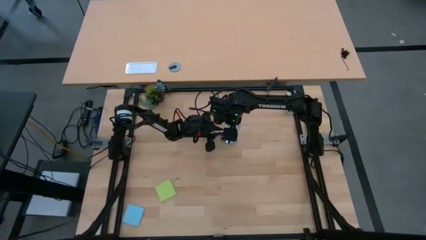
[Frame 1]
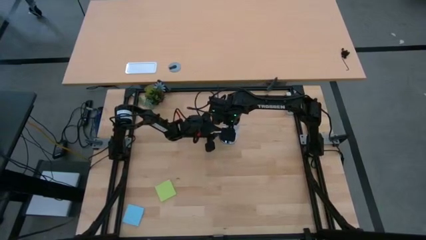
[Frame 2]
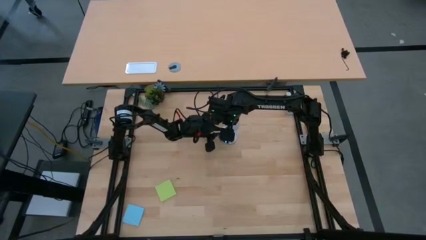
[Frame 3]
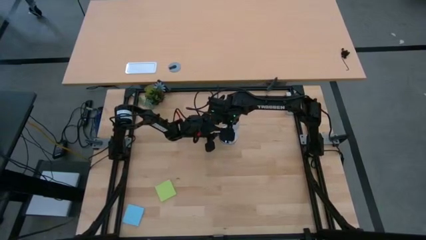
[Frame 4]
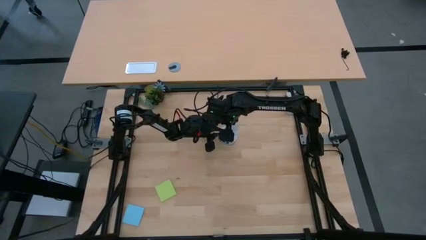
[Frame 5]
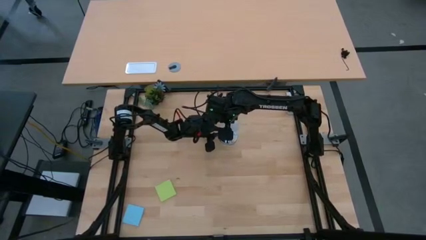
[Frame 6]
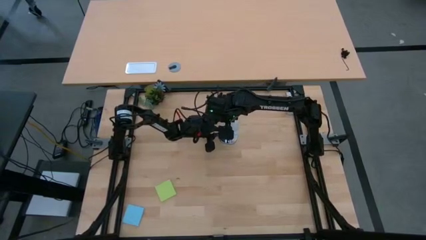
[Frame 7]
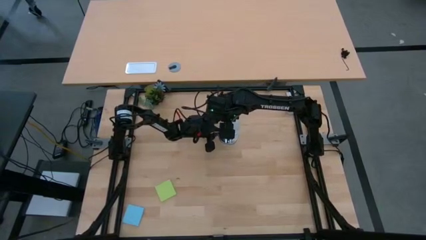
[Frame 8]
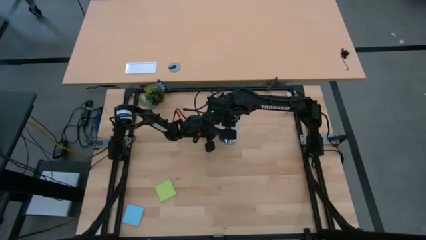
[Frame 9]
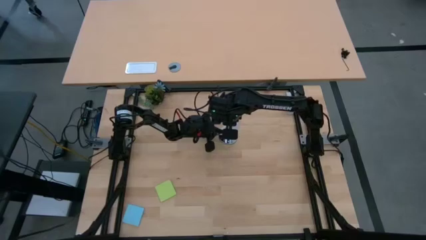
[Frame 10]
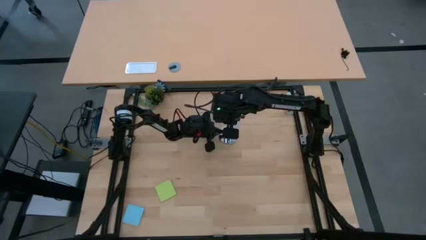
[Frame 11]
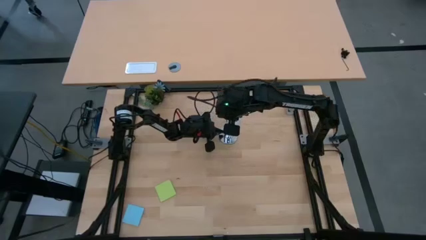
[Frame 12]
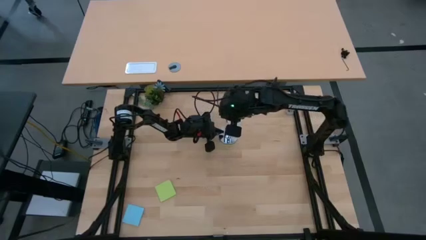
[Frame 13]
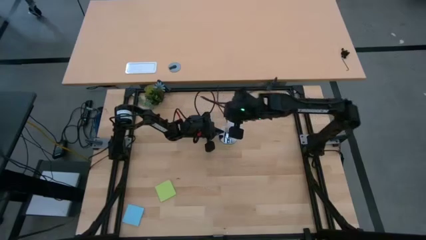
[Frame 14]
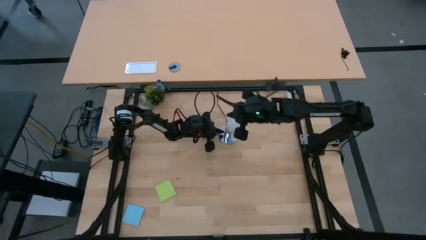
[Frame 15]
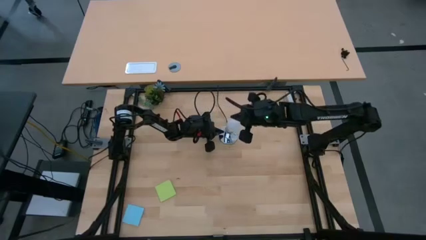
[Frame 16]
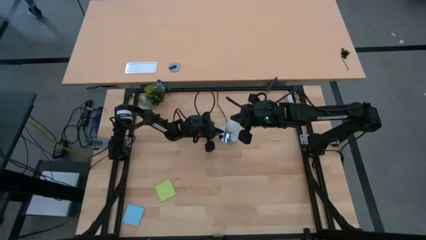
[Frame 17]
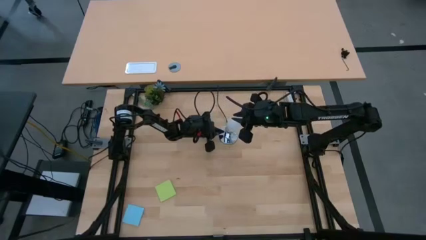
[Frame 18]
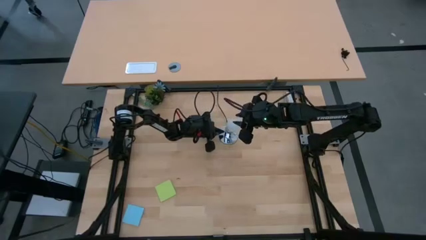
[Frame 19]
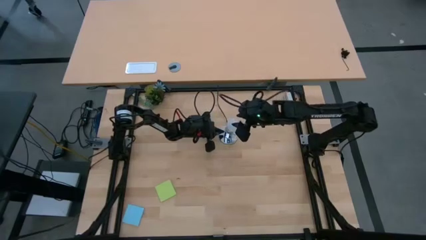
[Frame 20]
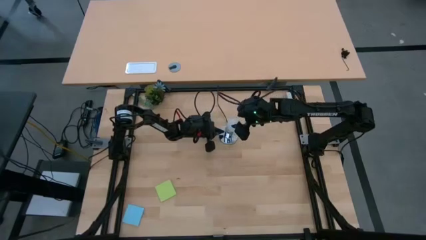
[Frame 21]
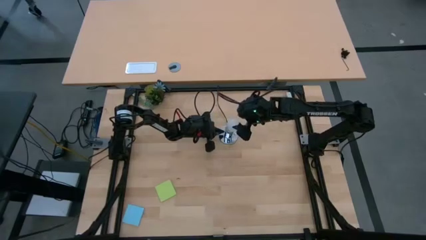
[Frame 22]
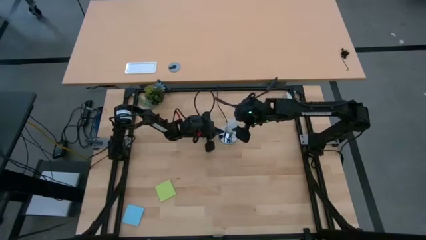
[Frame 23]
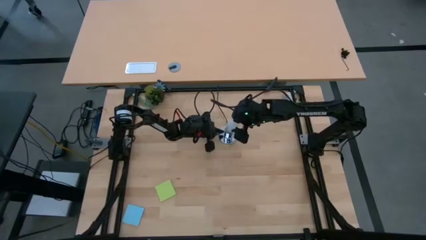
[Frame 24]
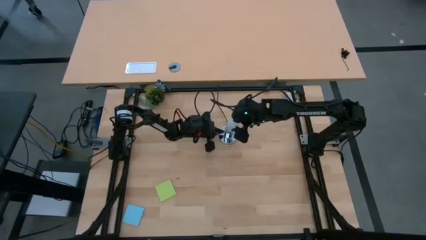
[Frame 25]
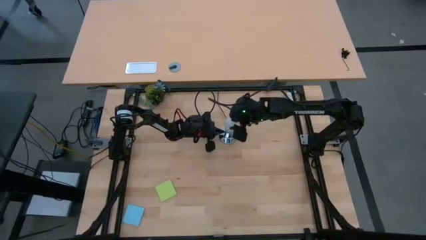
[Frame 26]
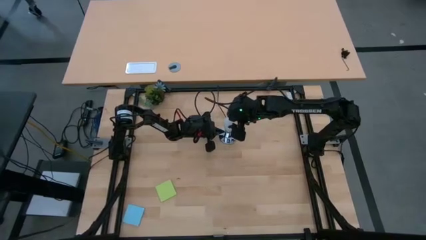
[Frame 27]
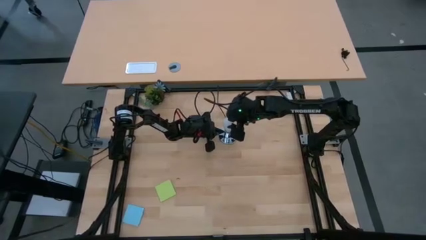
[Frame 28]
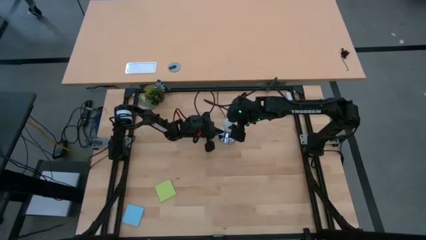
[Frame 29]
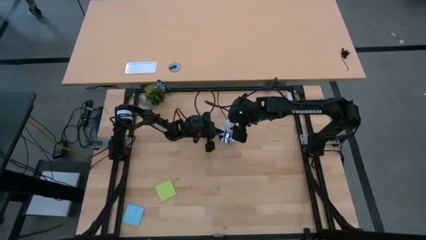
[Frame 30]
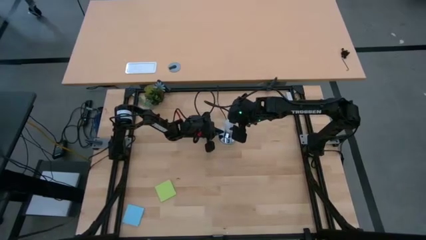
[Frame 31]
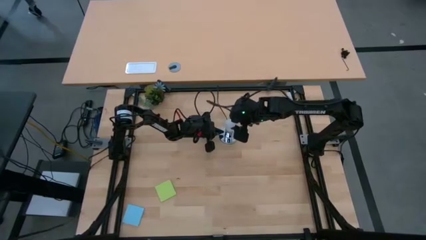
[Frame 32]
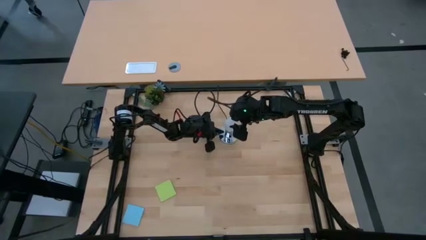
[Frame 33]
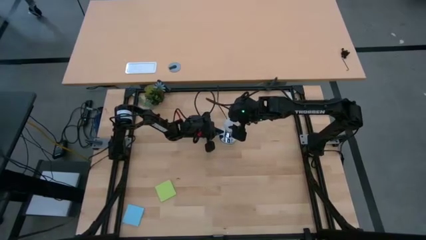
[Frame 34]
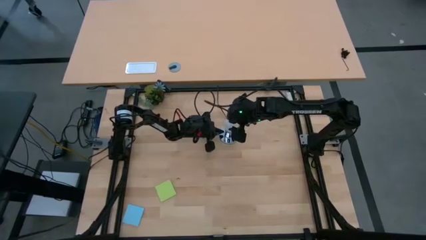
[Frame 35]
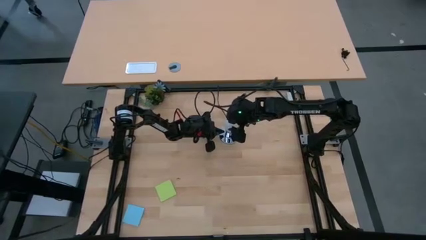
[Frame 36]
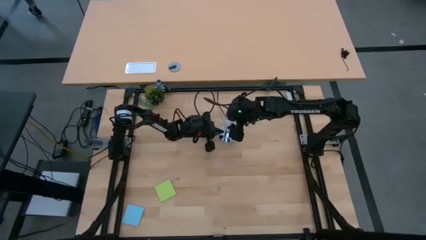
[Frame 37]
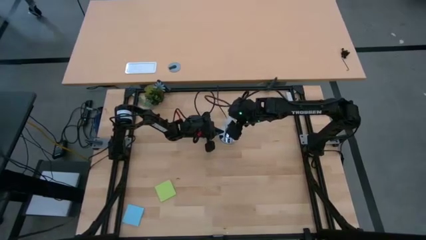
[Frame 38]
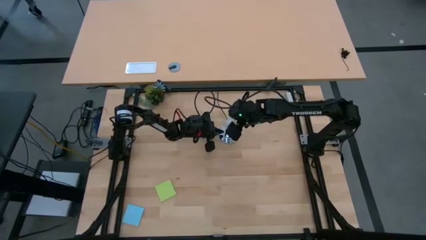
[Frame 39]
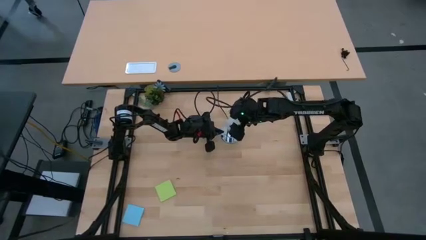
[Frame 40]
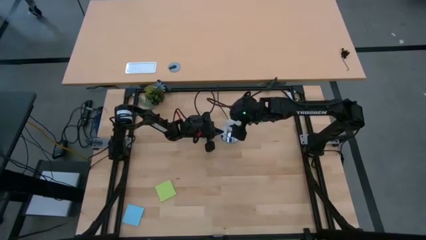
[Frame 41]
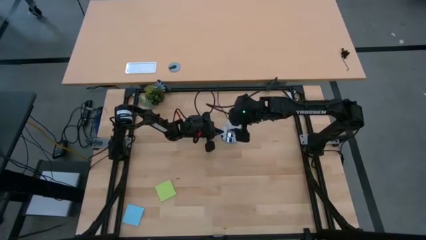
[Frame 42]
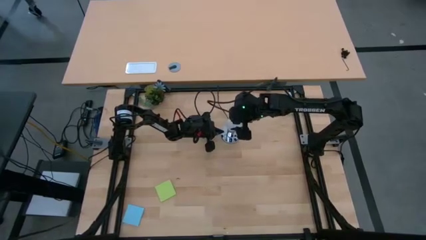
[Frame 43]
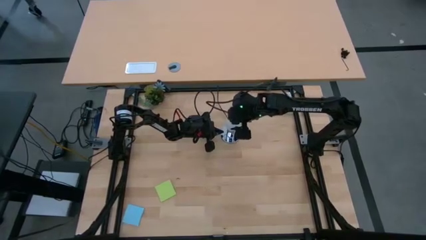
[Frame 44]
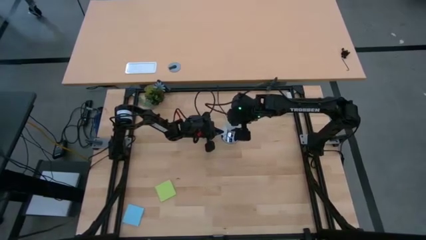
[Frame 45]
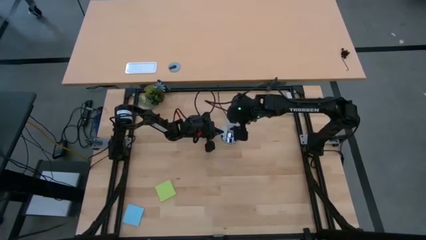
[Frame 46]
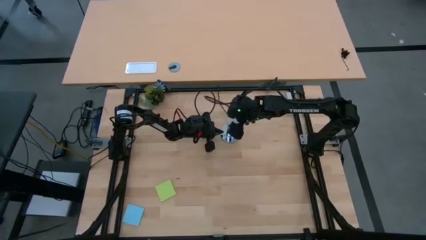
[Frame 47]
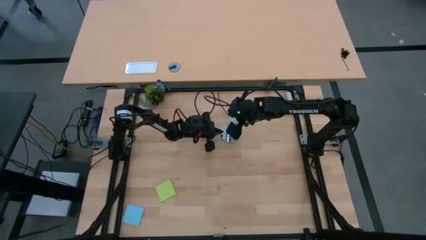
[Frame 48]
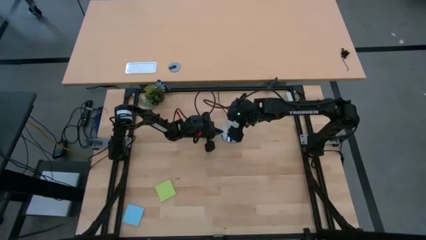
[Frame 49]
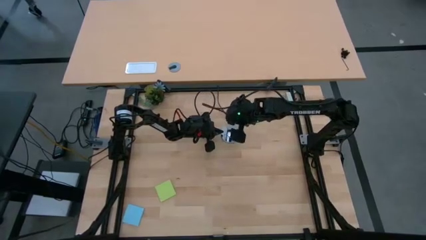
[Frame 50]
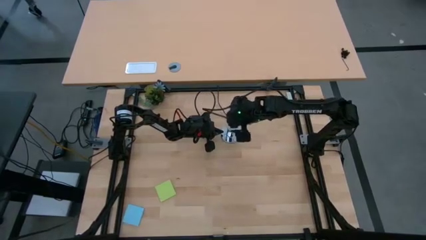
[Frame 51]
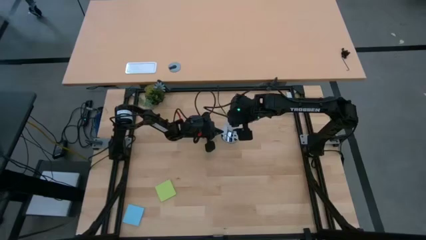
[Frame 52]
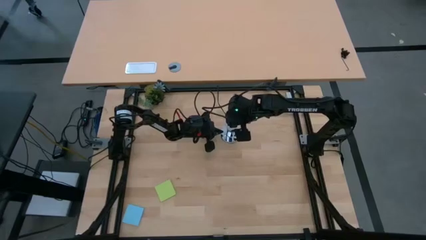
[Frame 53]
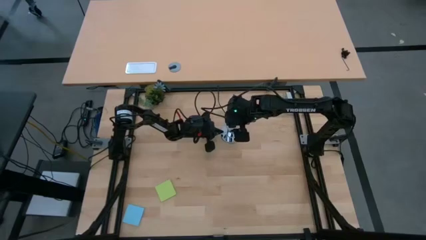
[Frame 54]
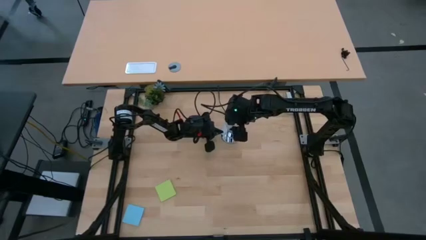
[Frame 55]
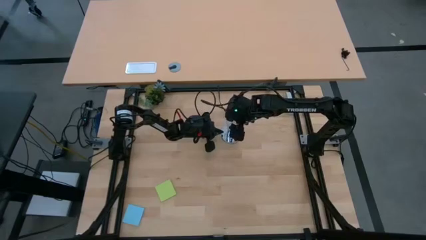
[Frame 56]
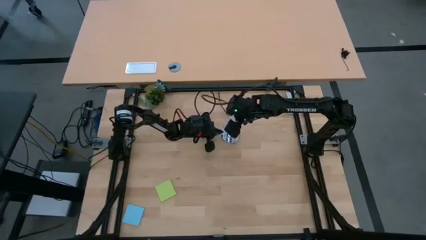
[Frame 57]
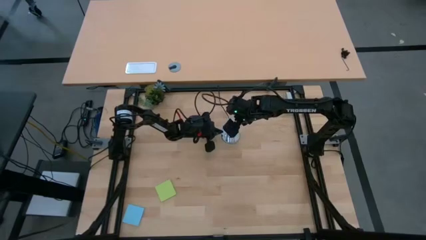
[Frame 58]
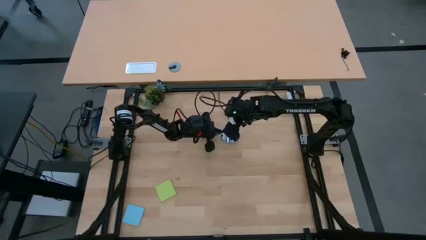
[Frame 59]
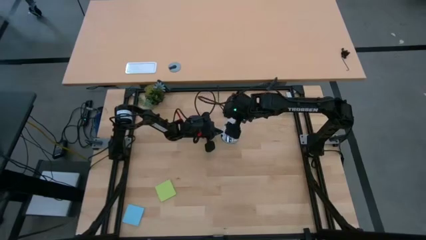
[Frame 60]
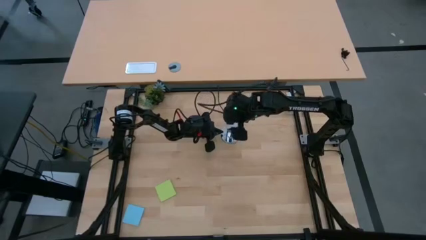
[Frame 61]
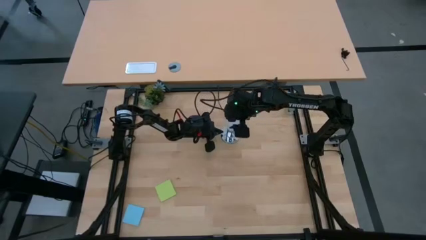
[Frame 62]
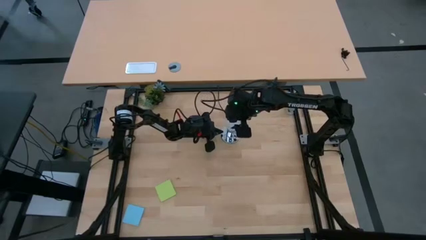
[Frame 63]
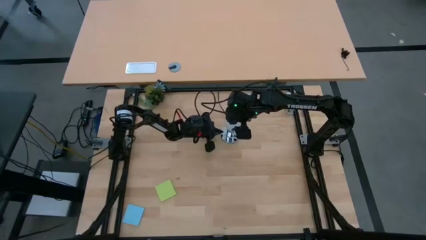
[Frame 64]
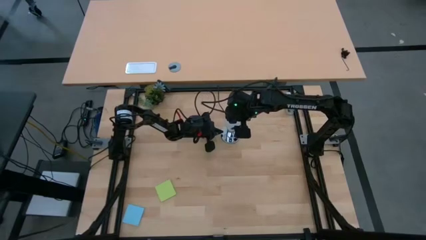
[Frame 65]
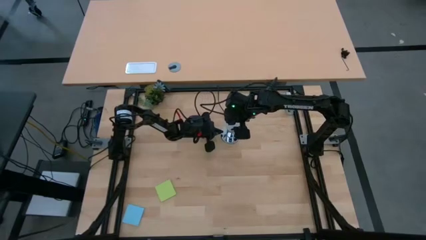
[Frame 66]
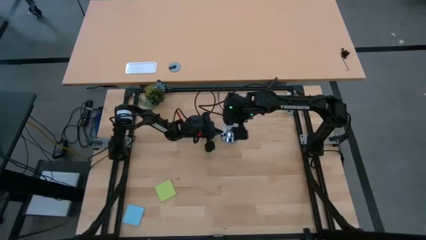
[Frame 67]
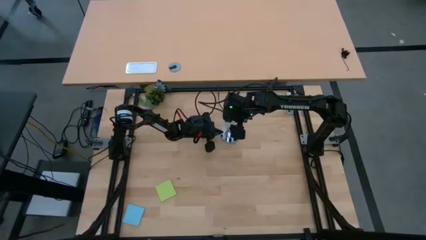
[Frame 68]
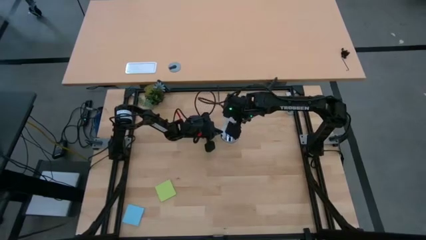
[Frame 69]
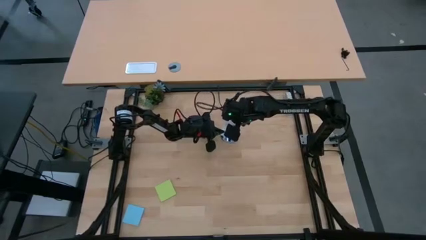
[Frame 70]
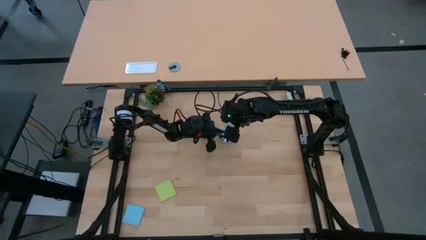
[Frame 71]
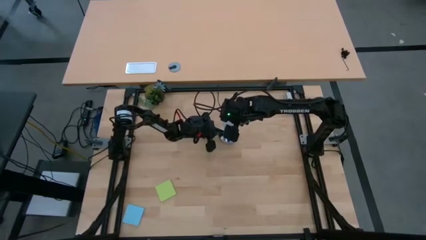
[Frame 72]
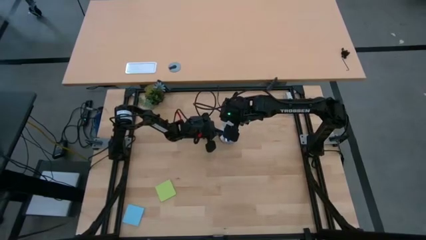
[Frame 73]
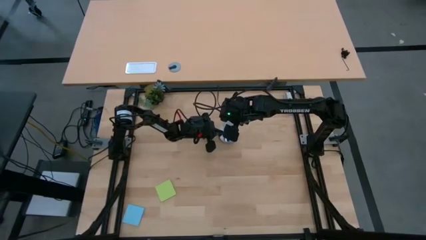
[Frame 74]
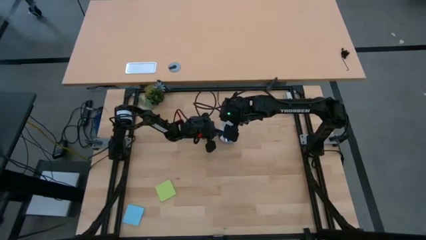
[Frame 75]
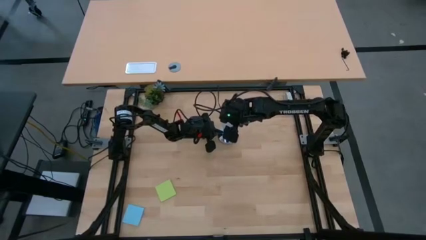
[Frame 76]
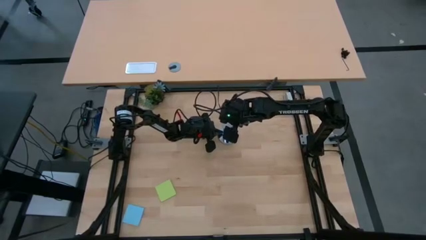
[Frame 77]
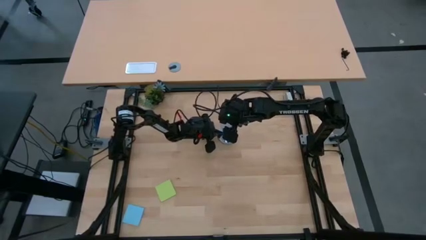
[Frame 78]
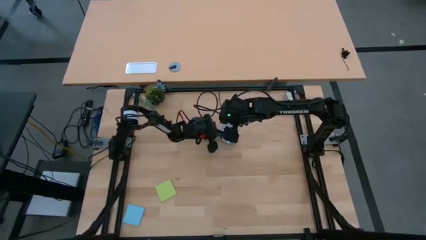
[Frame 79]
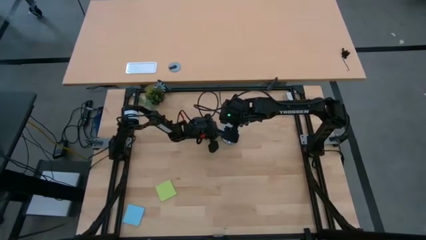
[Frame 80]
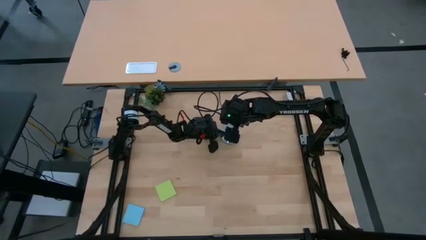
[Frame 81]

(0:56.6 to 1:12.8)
Task: Screw lightbulb
Insert the lightbulb into the lamp
